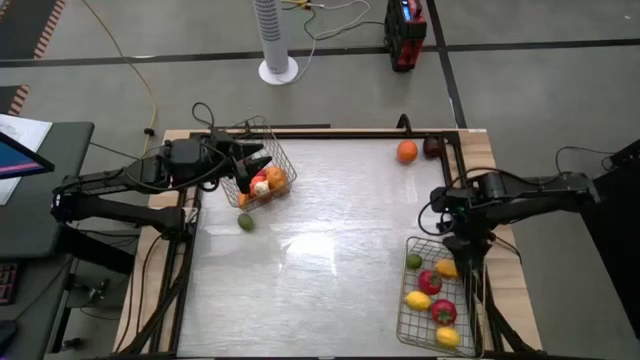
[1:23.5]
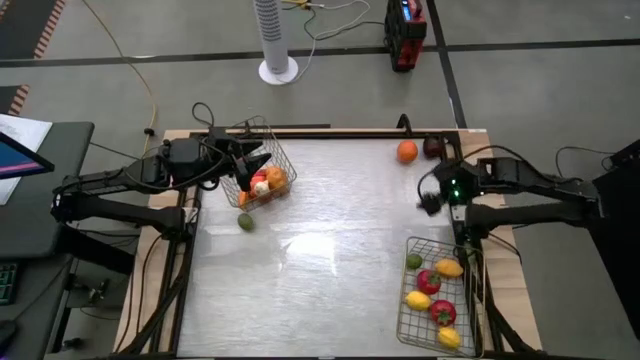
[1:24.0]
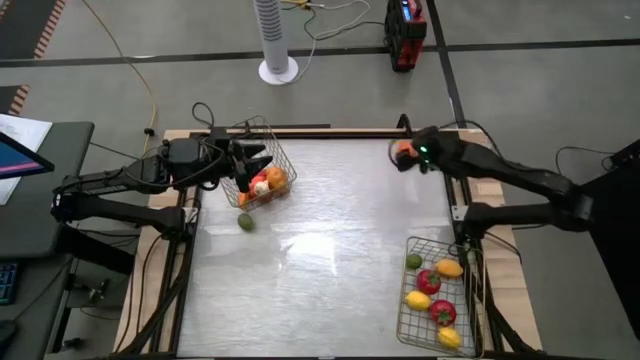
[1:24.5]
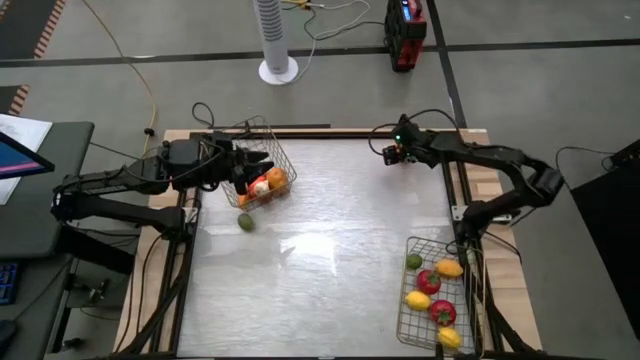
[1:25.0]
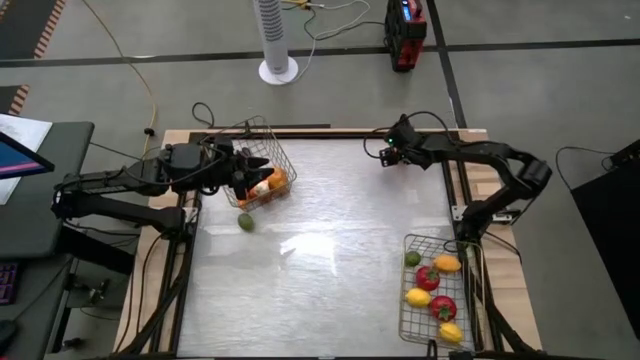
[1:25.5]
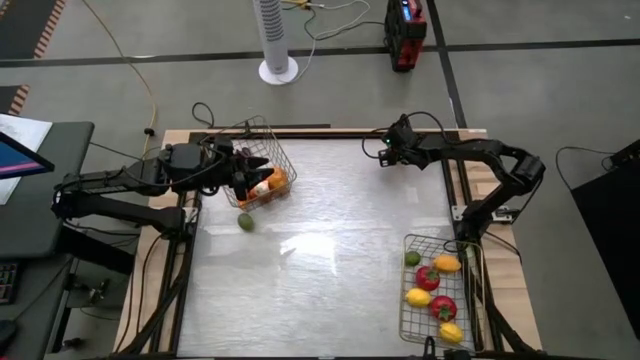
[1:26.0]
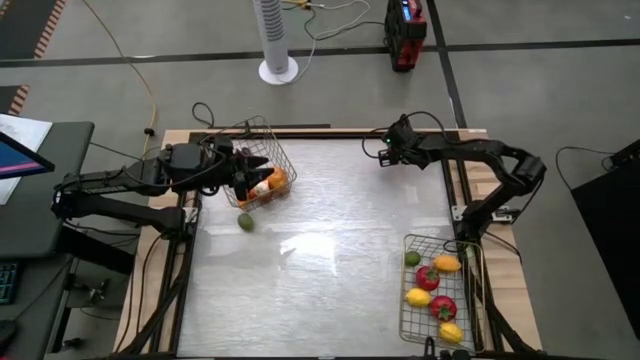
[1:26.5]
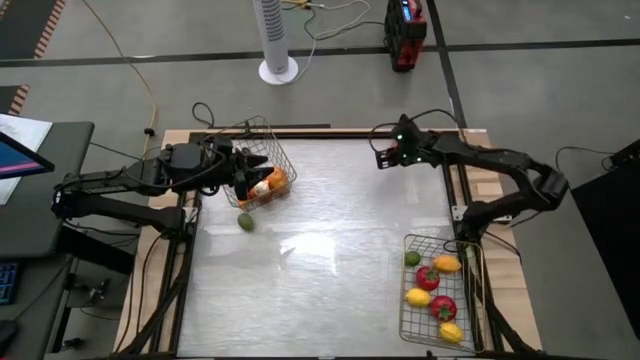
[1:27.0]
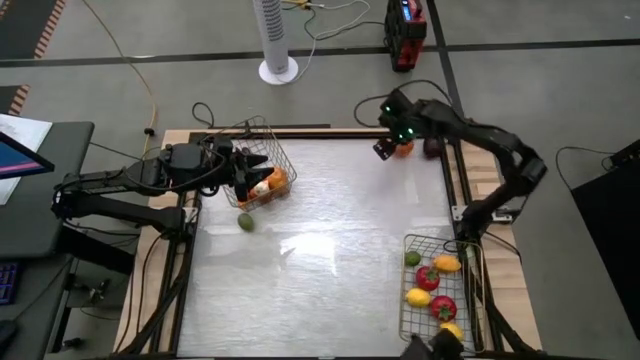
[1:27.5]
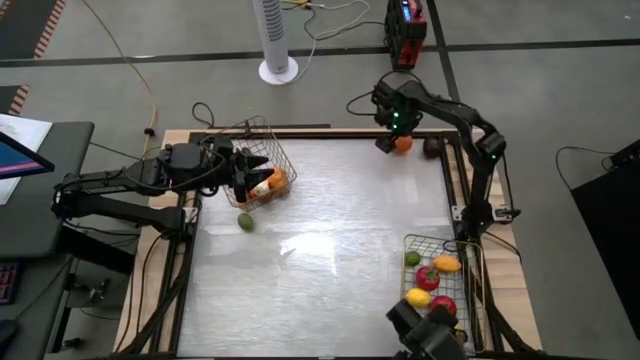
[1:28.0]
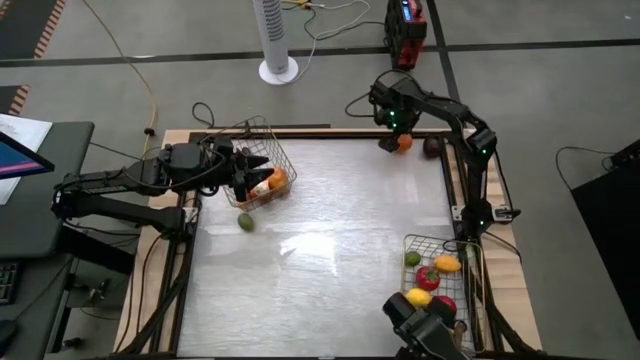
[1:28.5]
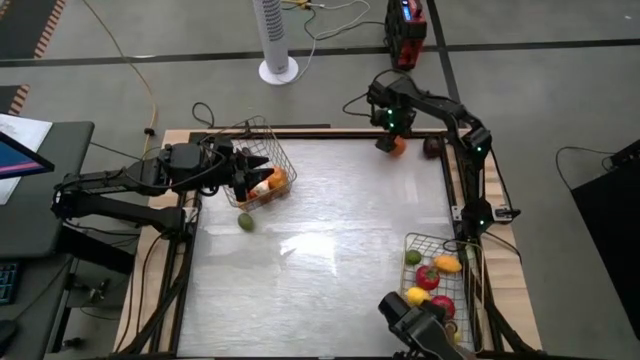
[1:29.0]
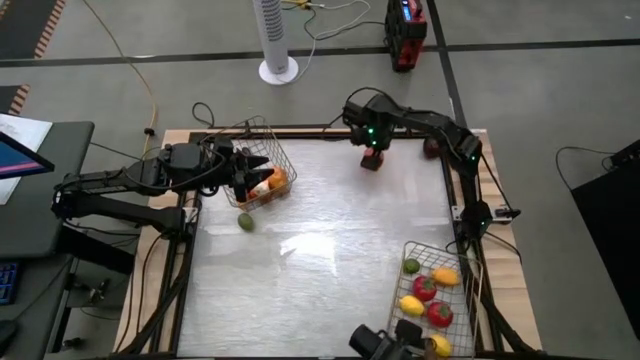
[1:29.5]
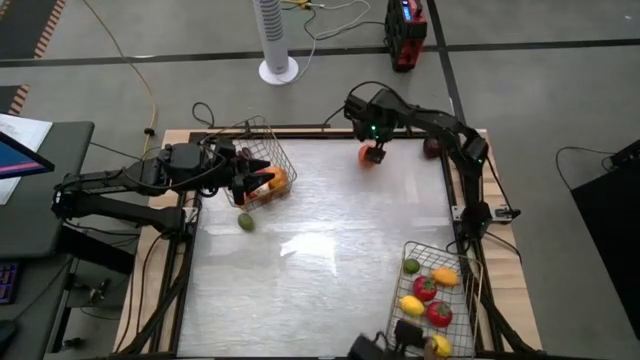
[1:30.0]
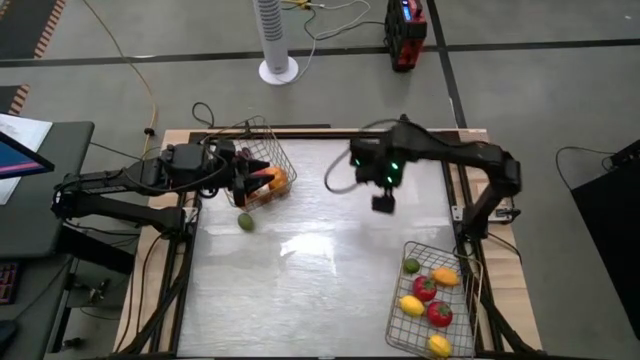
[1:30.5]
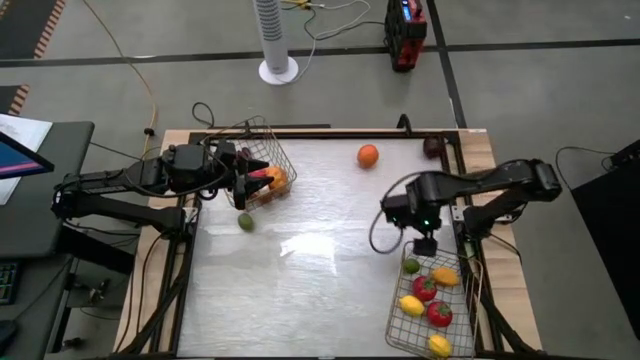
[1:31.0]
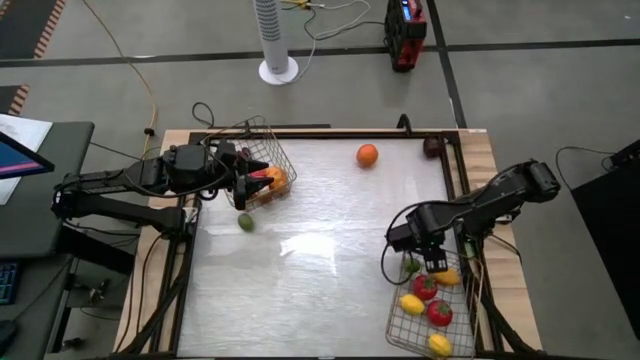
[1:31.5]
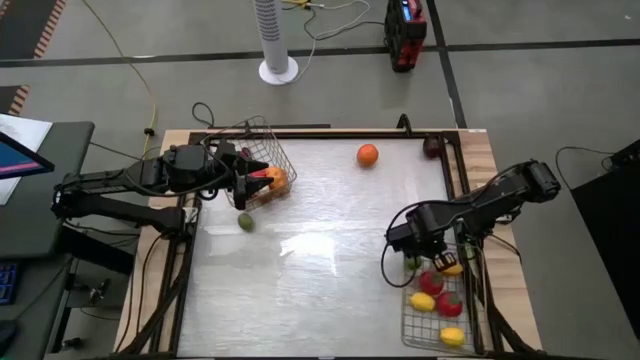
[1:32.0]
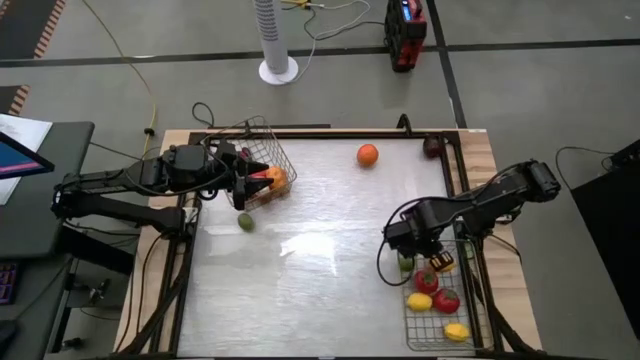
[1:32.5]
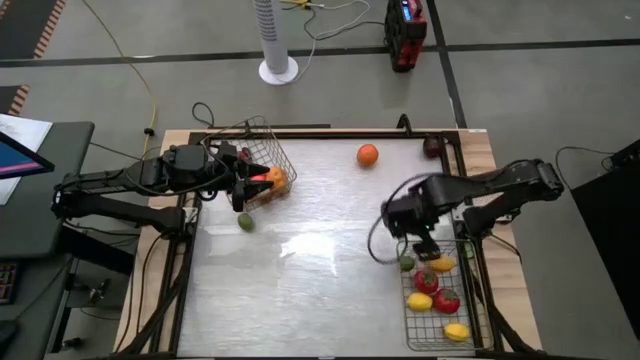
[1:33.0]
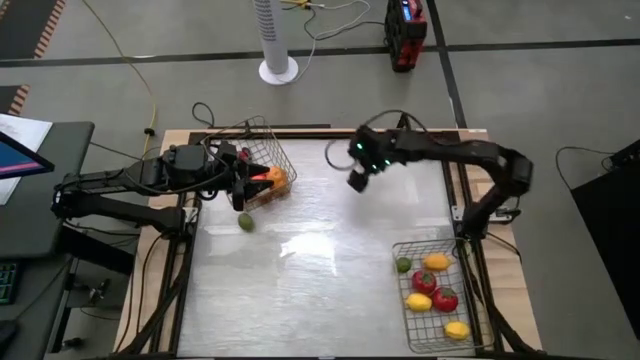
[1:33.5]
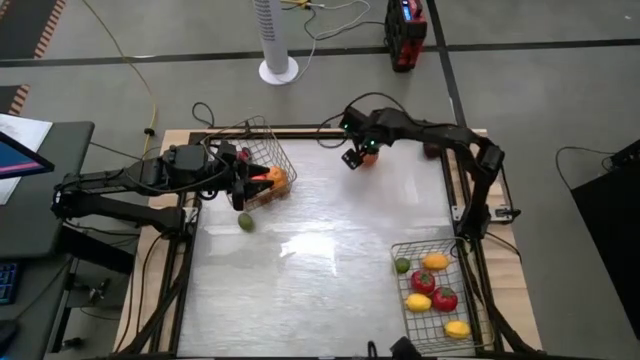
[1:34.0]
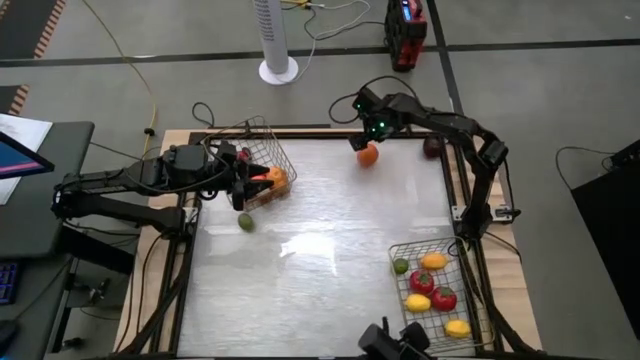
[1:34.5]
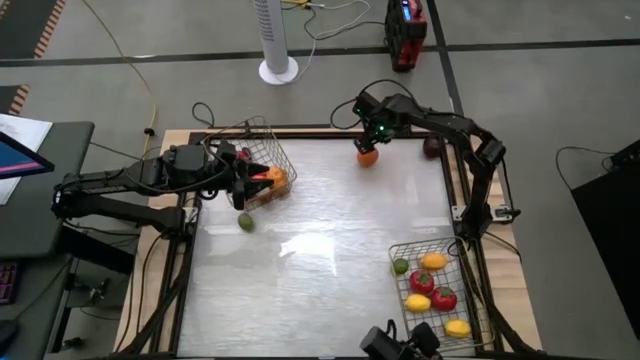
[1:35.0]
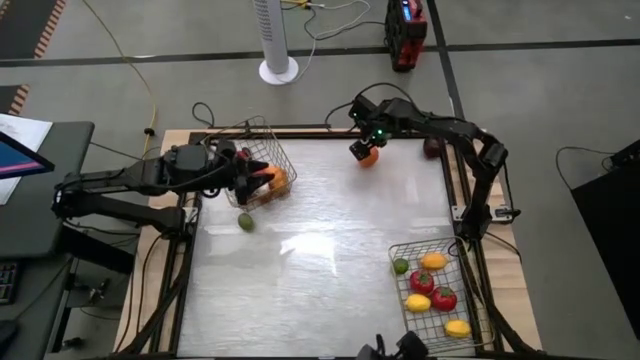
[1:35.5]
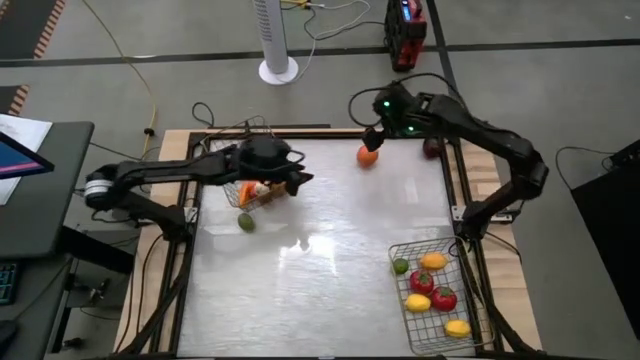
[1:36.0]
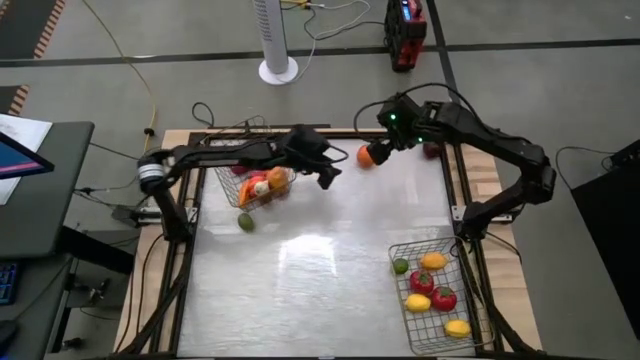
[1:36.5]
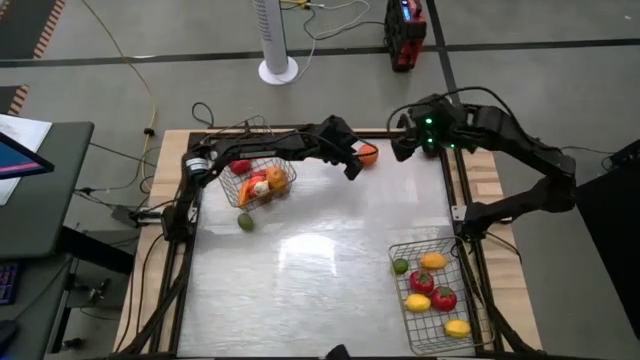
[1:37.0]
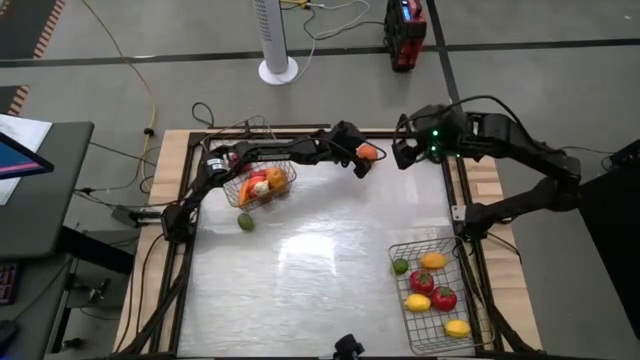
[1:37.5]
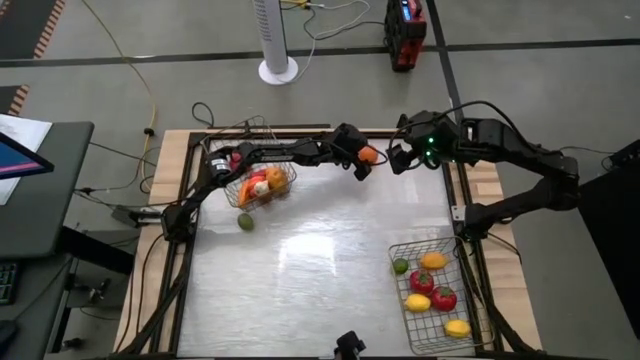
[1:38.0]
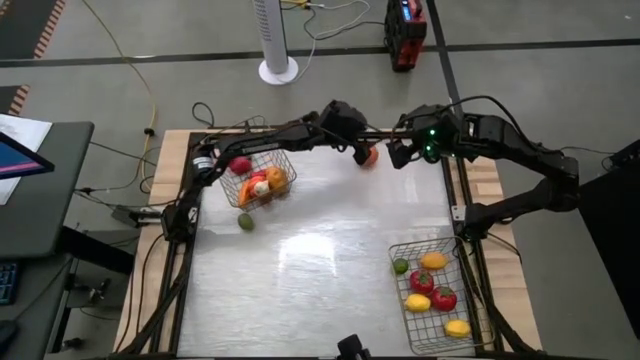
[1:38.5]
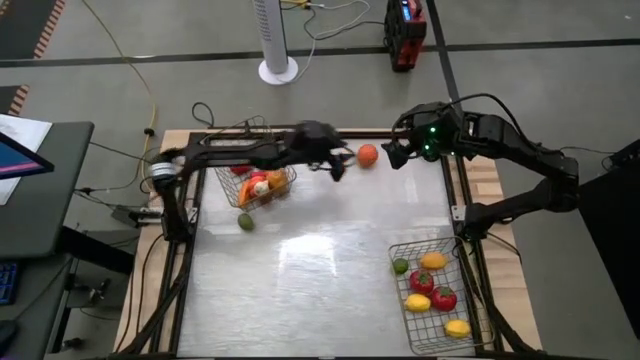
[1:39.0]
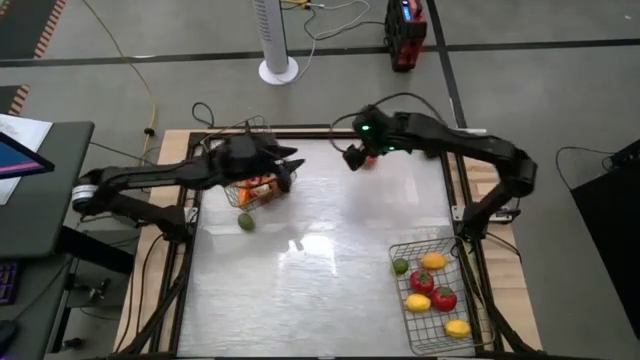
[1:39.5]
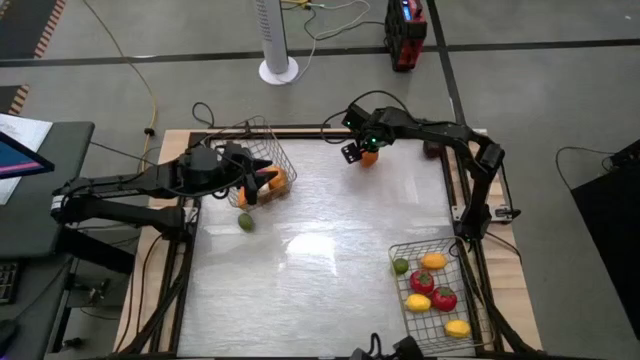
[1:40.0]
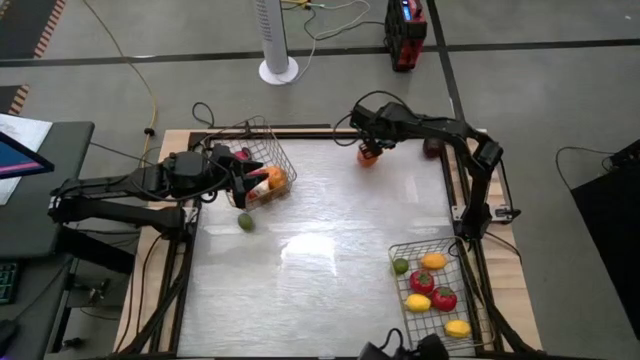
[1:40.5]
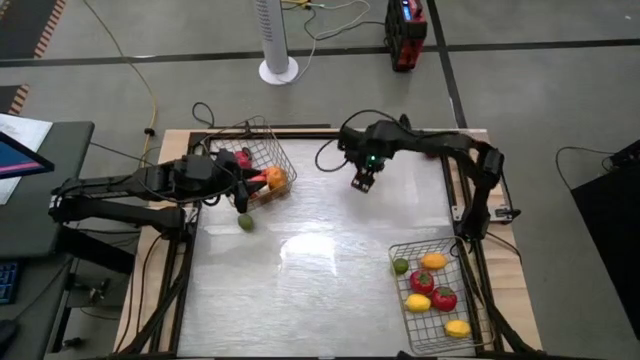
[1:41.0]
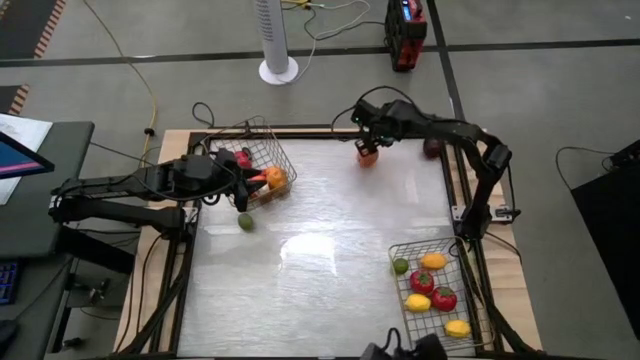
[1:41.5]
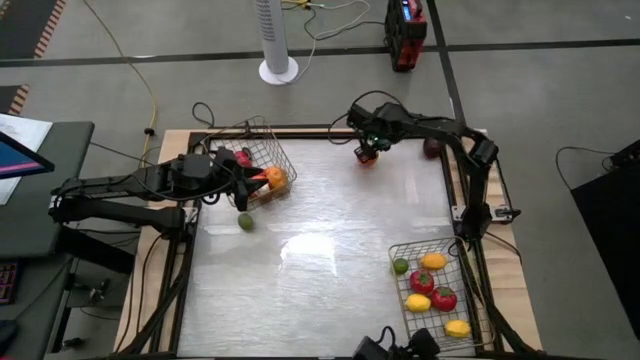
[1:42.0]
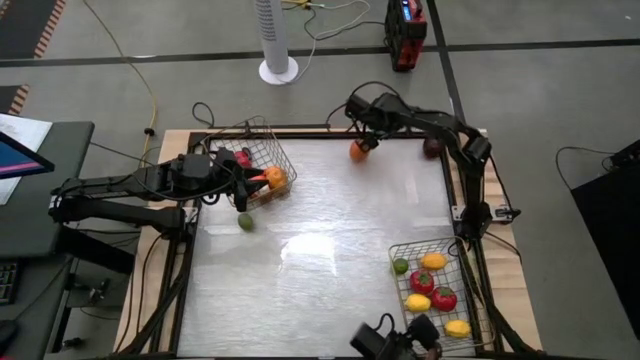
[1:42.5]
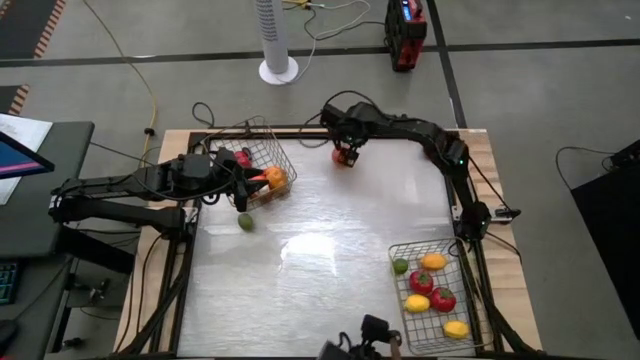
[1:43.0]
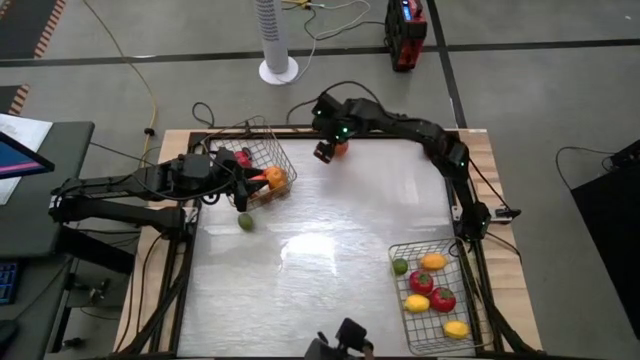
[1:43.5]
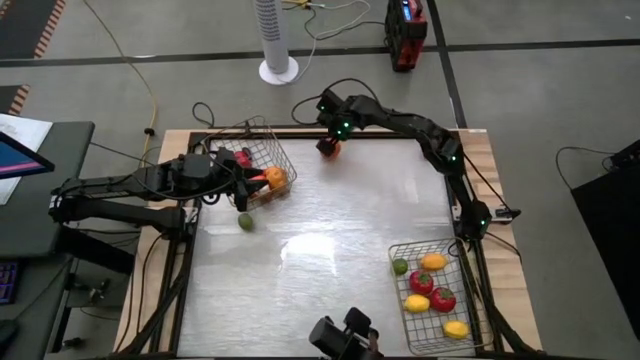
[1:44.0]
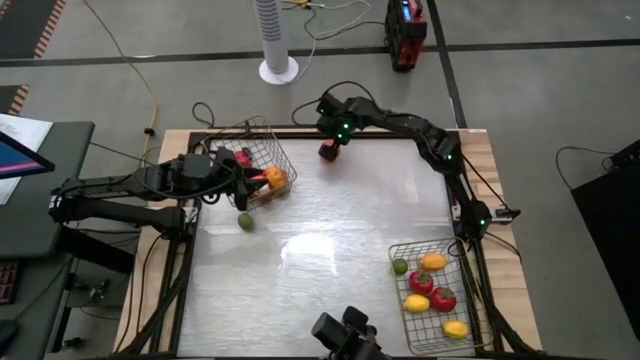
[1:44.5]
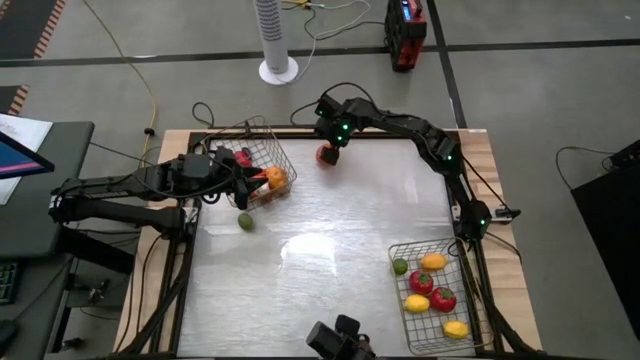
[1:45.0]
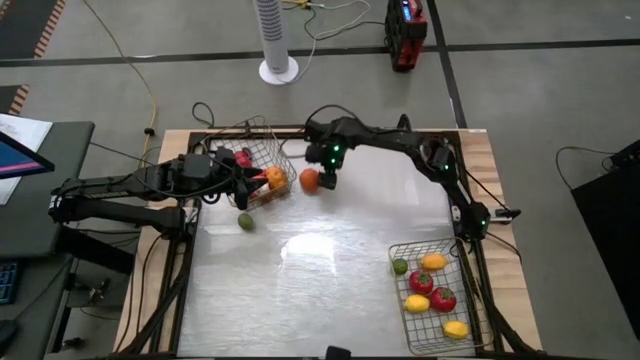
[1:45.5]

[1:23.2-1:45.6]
Task: Sort produce into baskets
Put the orange into the bottom wire basket
